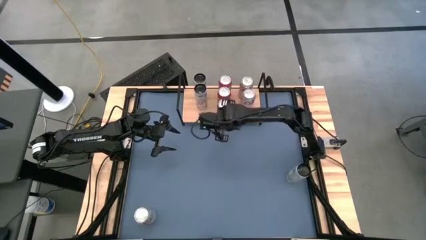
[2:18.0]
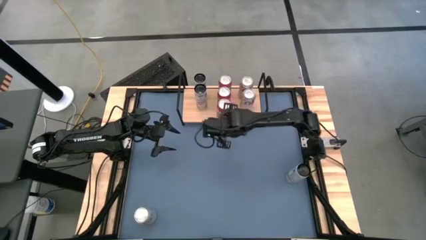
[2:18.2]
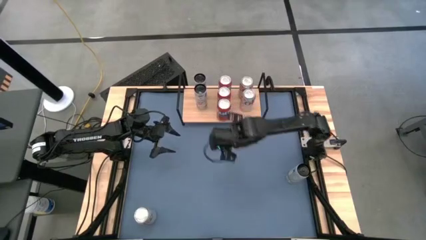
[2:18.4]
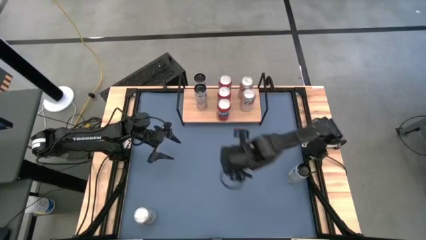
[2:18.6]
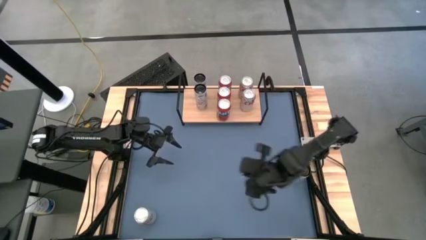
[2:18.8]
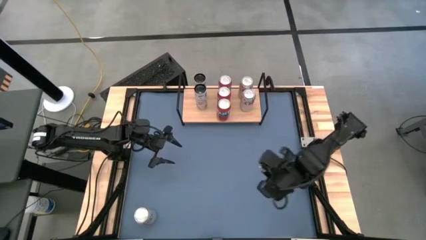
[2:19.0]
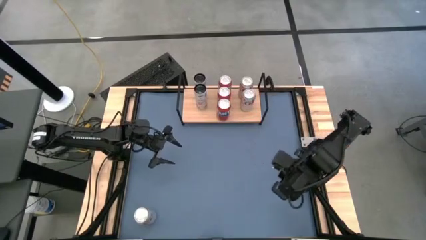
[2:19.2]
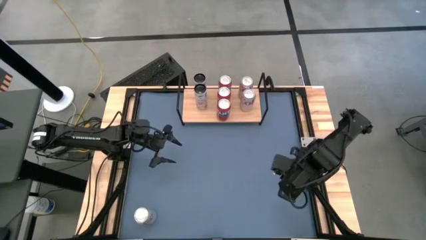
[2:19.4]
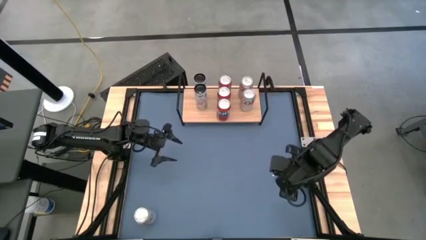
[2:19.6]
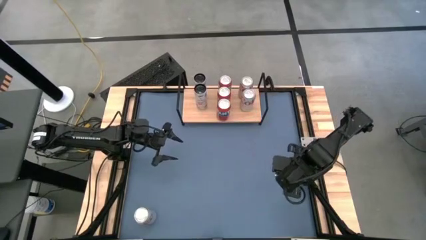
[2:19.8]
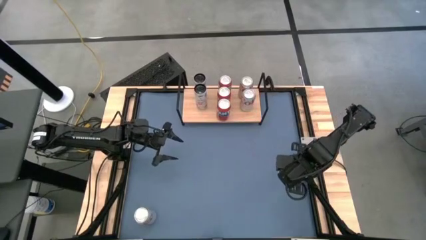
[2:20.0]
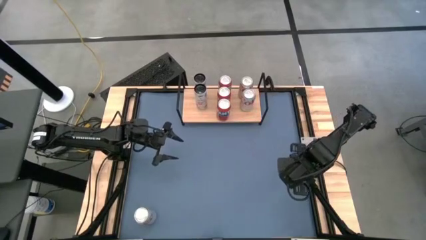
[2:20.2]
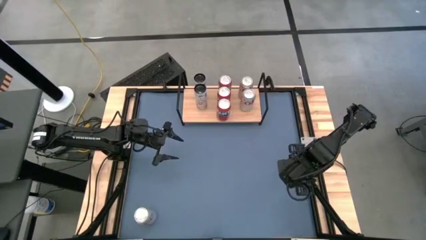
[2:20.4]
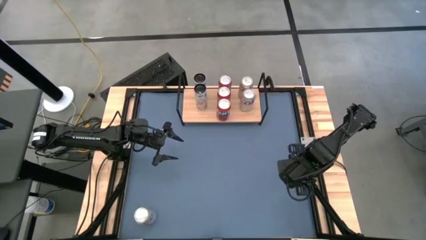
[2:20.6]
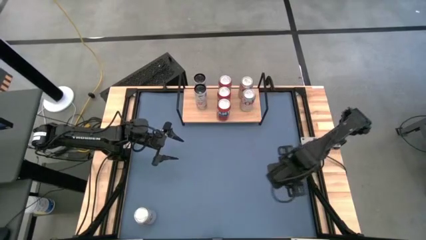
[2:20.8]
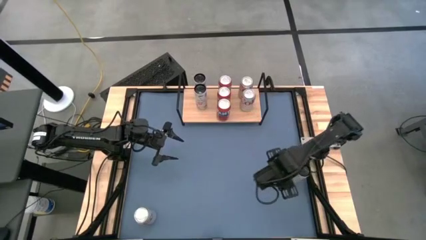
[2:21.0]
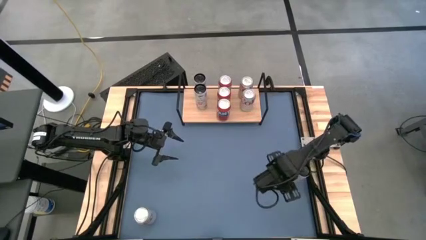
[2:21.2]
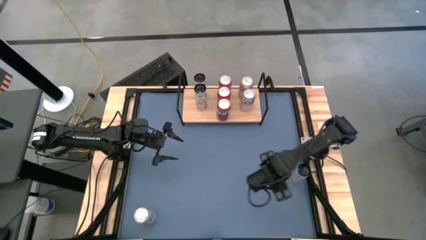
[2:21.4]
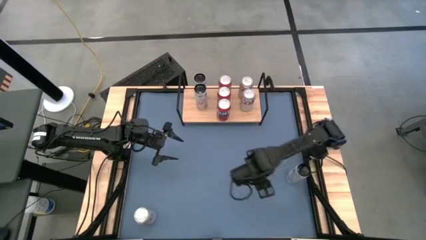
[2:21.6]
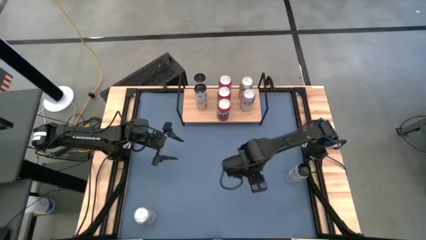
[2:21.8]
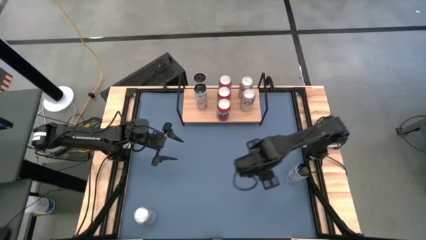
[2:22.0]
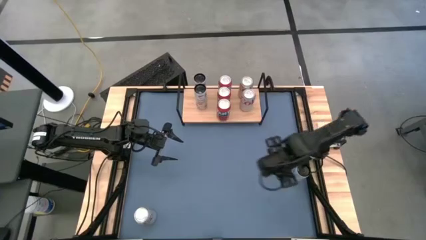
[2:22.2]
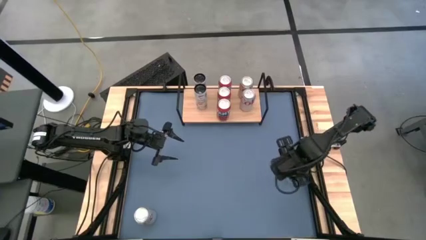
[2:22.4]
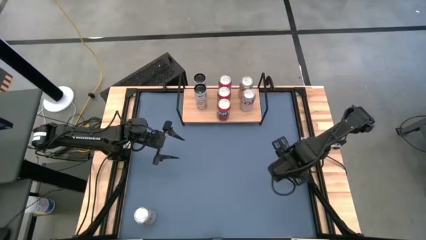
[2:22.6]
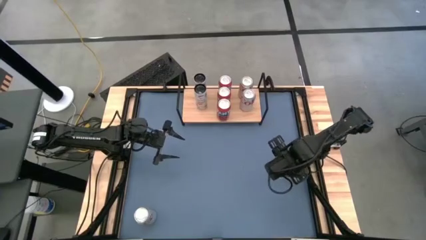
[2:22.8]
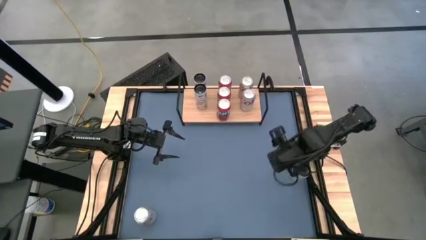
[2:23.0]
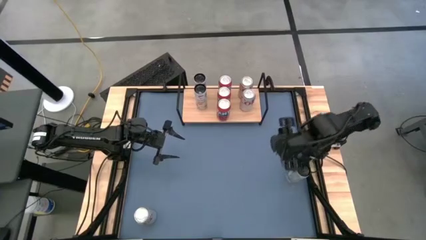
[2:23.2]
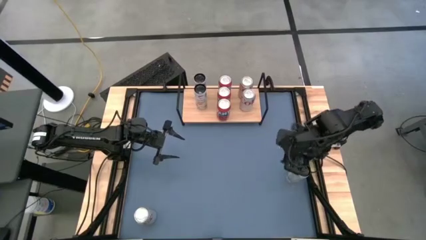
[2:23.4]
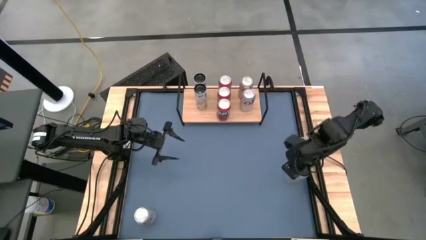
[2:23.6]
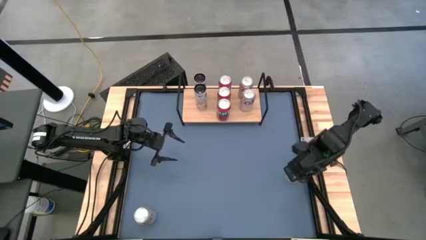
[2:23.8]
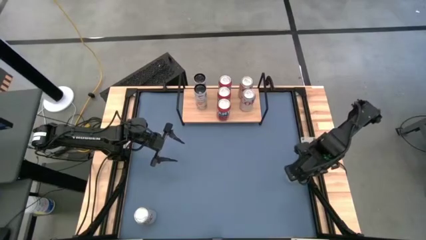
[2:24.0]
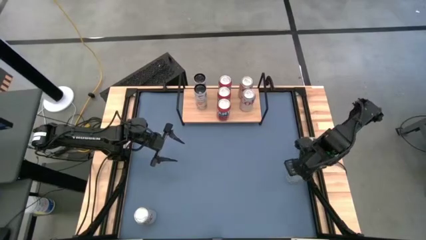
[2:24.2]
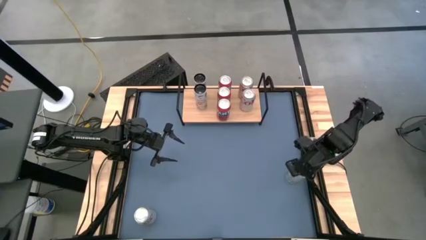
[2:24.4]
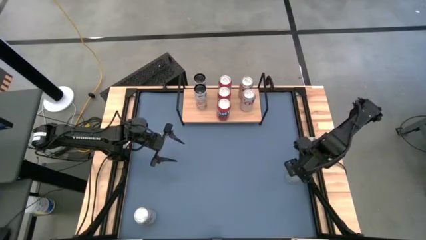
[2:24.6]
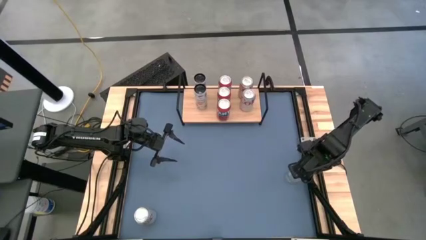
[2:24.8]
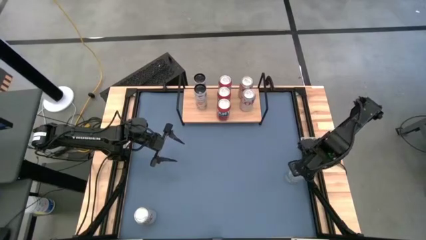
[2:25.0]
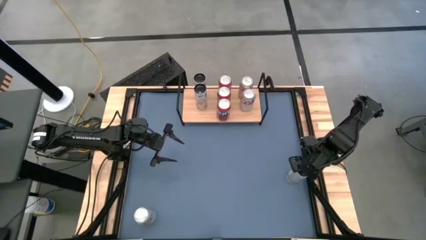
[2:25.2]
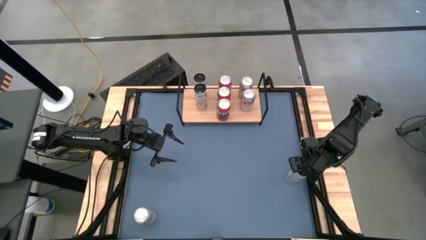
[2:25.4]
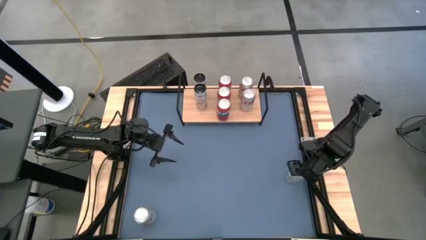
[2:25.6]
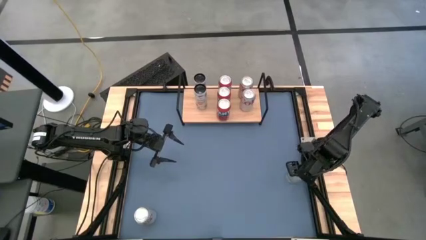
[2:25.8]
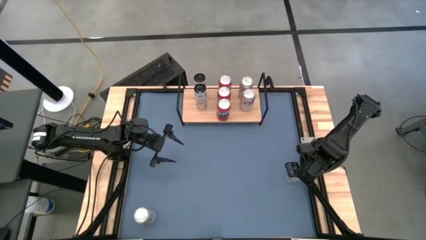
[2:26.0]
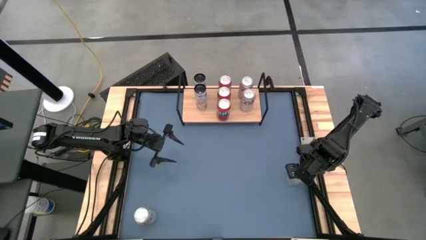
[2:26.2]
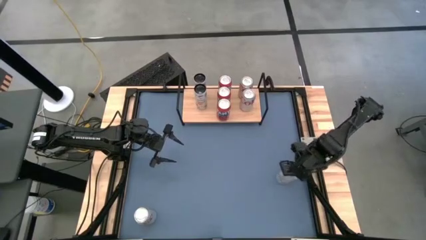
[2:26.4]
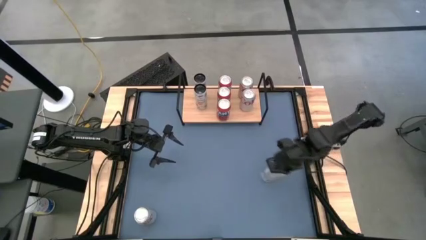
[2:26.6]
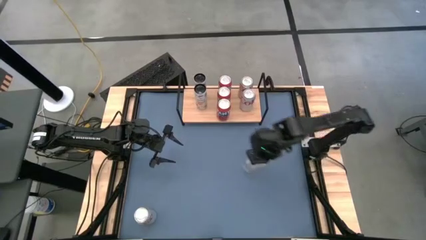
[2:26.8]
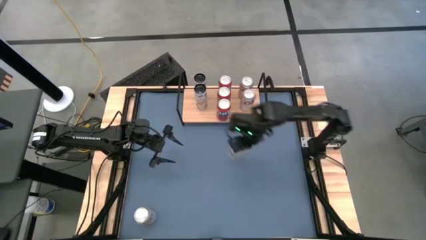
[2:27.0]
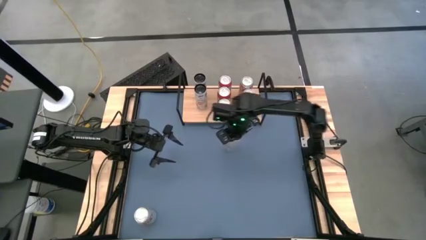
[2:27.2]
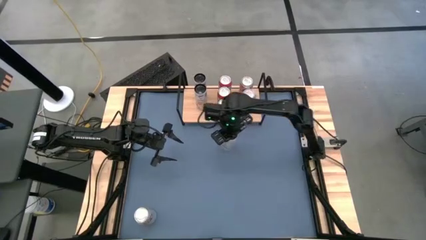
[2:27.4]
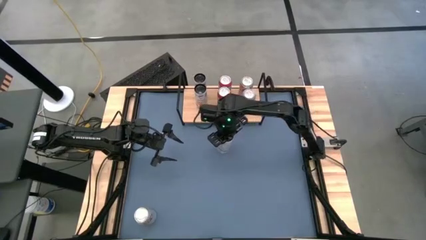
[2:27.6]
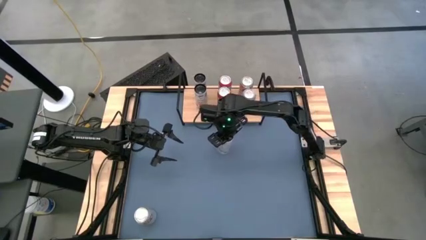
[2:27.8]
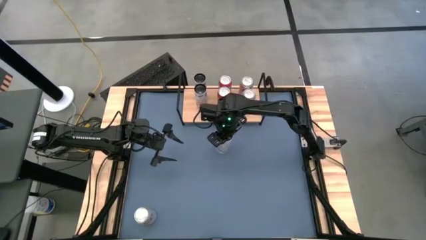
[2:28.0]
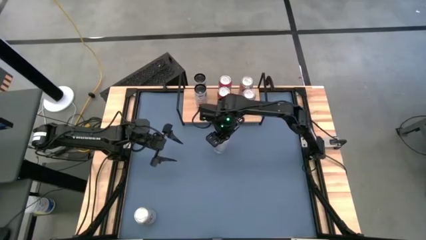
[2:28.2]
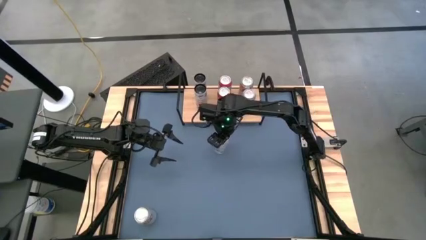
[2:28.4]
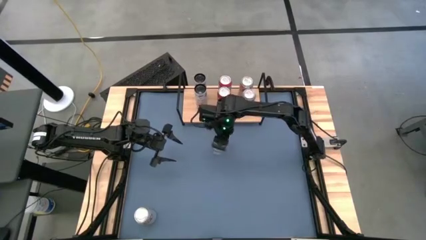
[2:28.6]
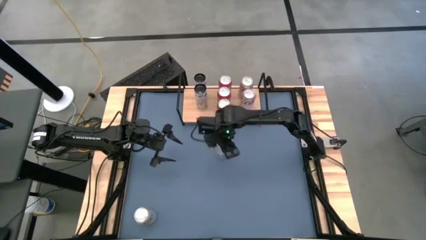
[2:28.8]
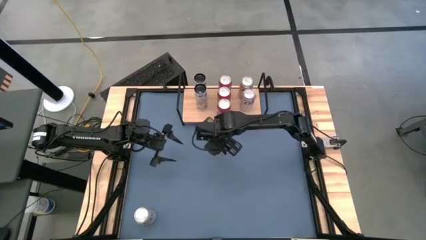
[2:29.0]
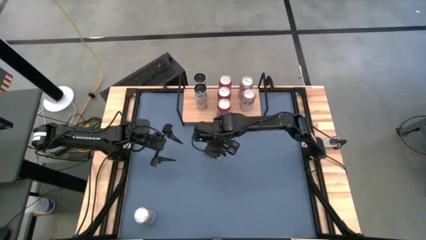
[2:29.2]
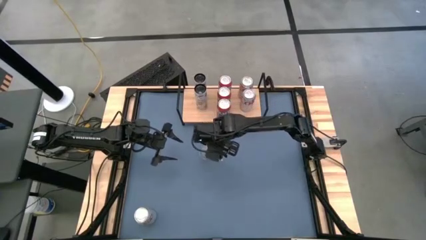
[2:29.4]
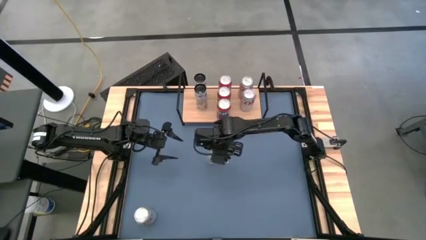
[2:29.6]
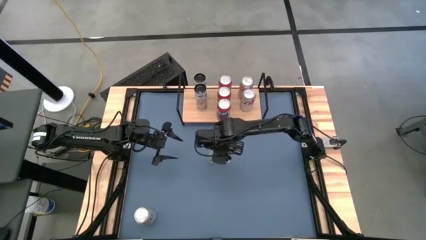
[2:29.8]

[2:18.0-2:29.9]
Task: Place canned beverage on shelf
Put the black soda can on the shelf aligned with the other black soda can

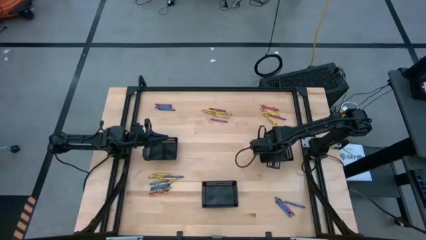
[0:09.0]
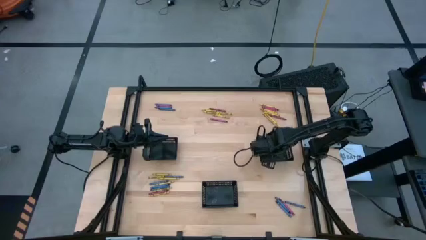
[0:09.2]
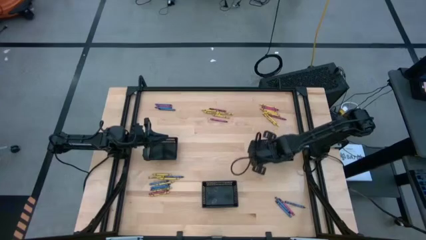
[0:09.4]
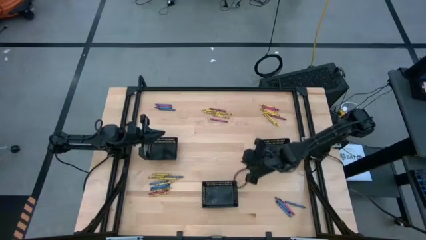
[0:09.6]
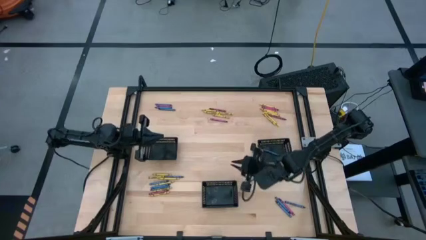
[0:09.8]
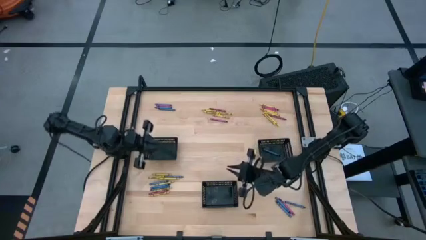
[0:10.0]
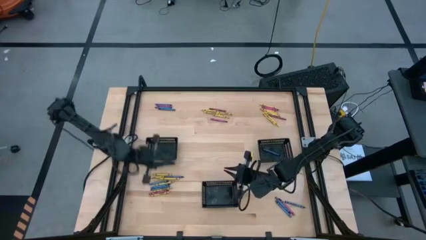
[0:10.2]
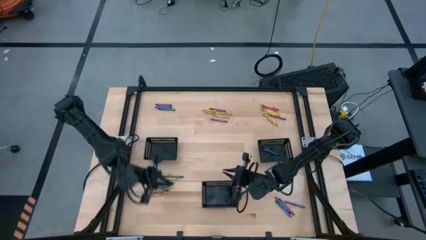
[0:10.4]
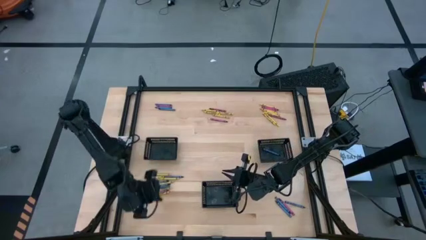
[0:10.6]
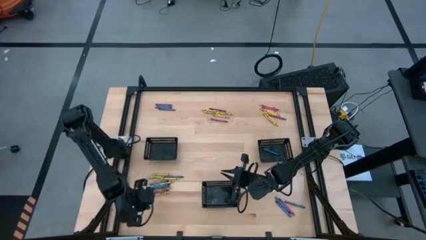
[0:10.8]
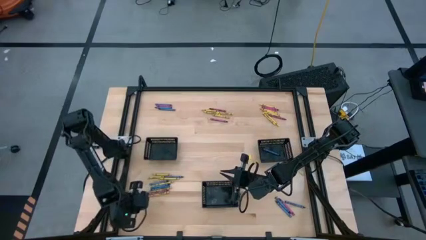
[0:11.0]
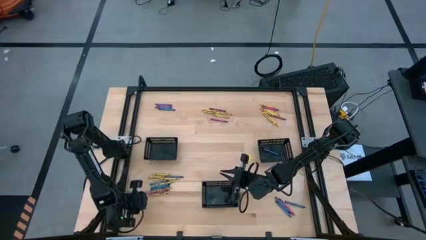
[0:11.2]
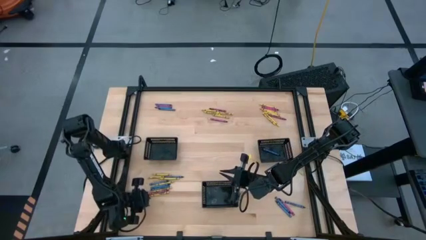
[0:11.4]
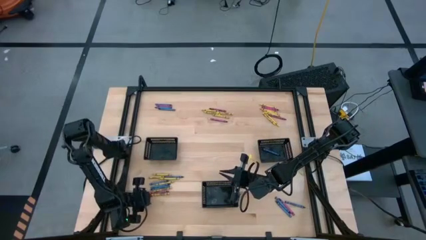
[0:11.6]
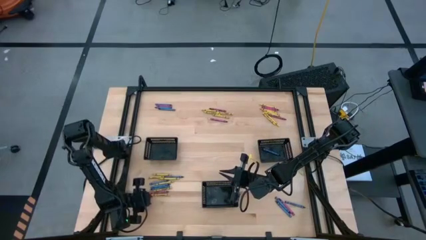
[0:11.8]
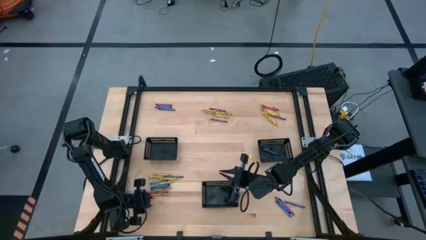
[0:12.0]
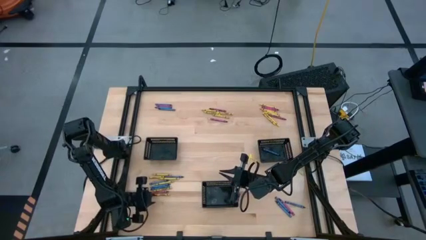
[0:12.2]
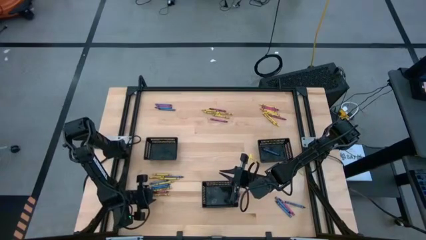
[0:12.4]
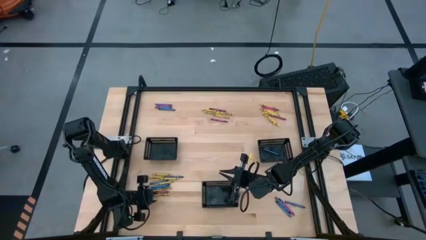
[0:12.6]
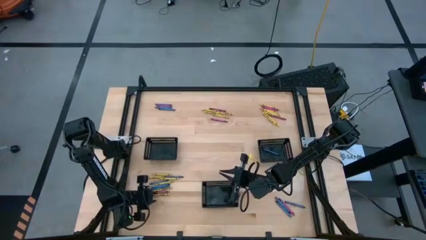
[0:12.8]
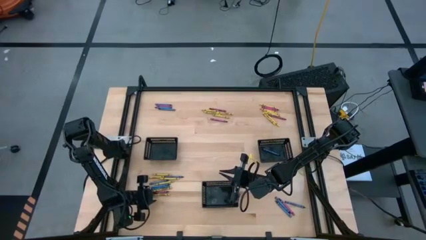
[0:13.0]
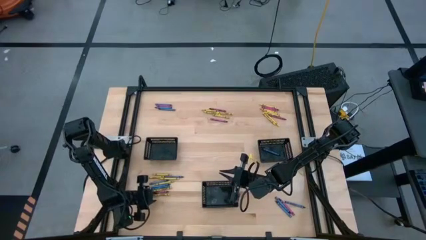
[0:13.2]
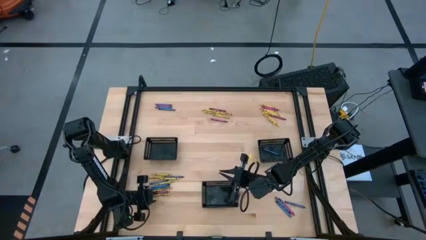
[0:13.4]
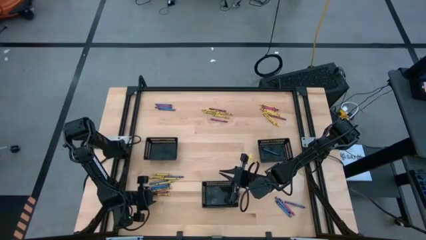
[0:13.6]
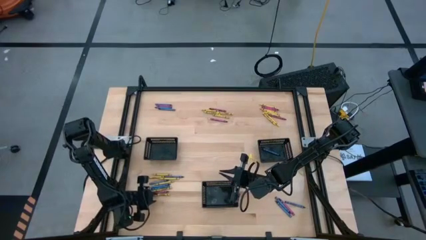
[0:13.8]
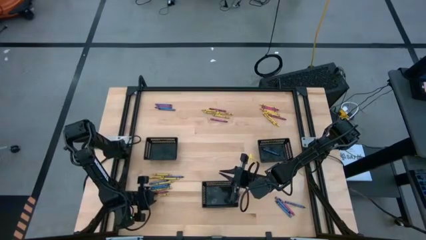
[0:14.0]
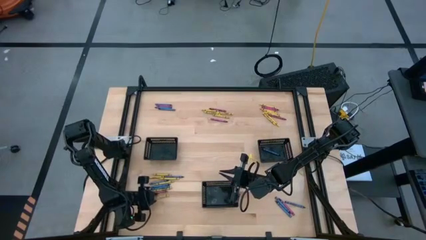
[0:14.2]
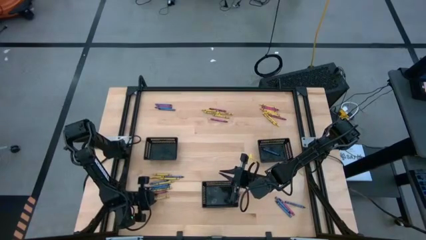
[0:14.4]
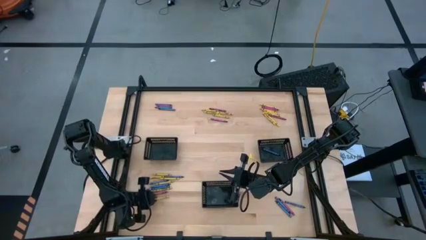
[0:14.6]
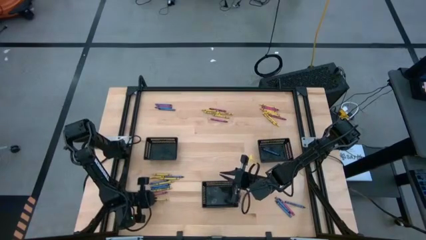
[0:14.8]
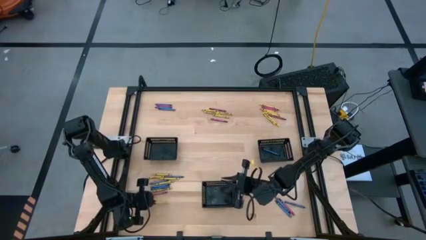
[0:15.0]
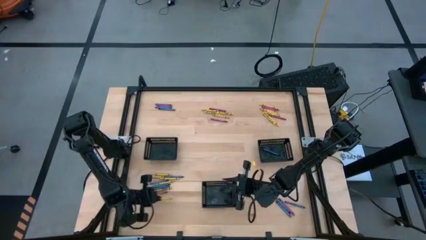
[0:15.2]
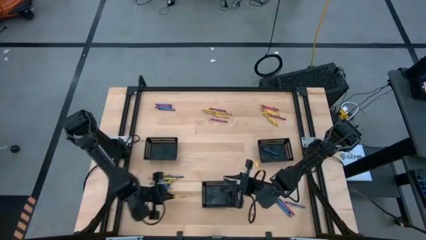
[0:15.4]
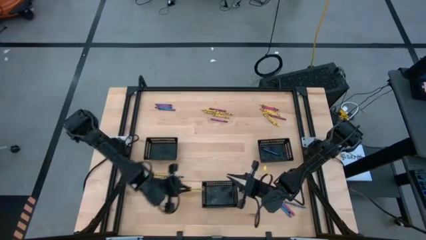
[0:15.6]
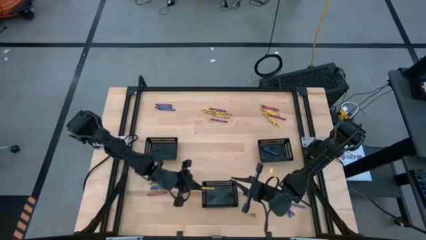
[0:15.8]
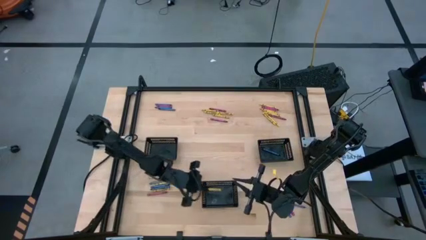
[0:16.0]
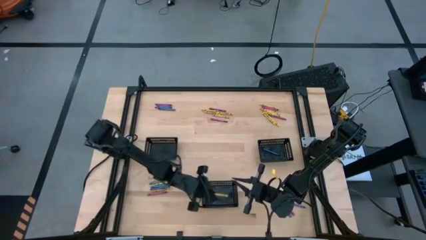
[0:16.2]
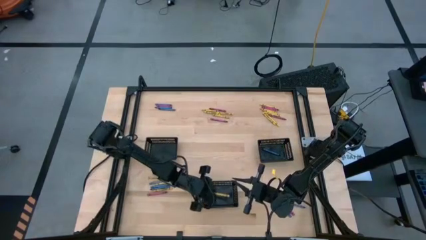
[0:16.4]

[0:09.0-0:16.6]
Task: Sort crayons
Put the yellow crayon into the bottom black bin
